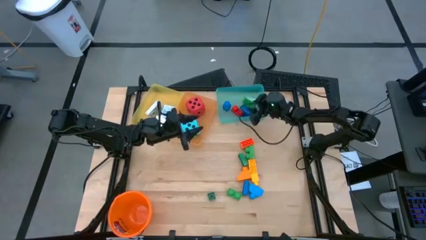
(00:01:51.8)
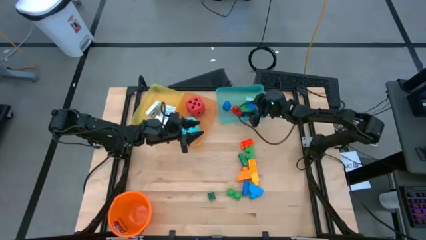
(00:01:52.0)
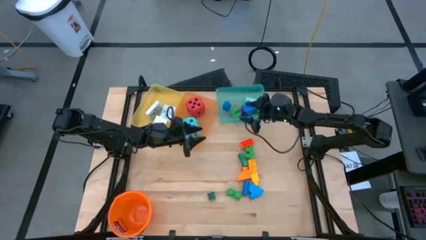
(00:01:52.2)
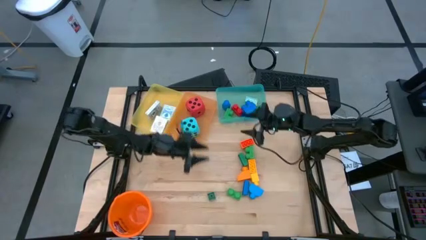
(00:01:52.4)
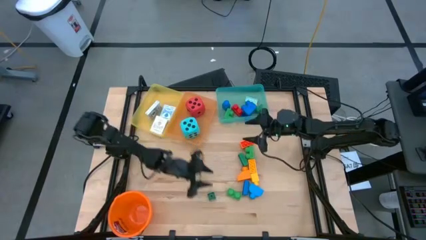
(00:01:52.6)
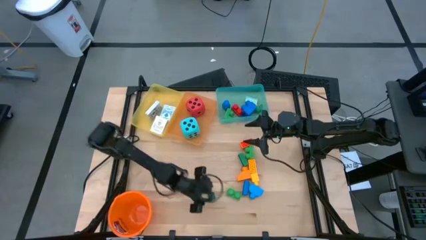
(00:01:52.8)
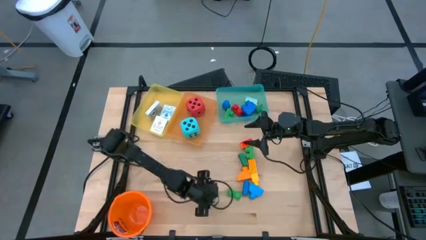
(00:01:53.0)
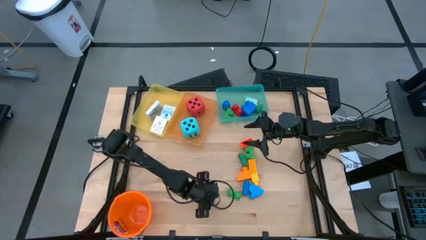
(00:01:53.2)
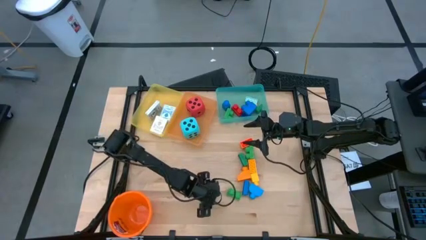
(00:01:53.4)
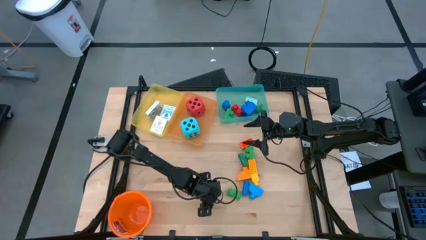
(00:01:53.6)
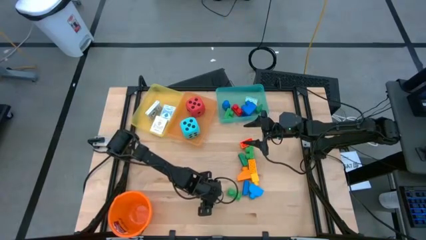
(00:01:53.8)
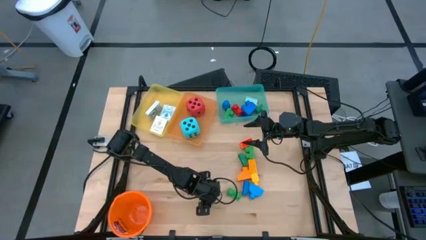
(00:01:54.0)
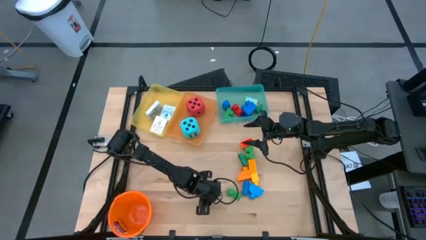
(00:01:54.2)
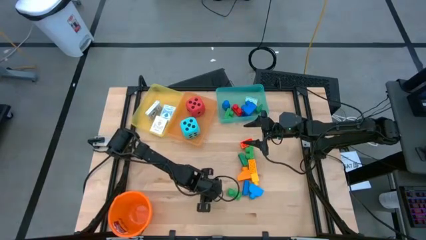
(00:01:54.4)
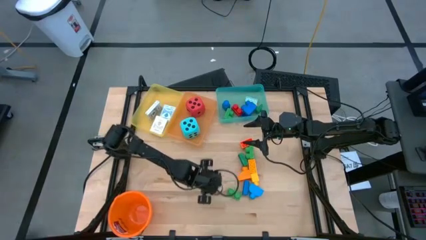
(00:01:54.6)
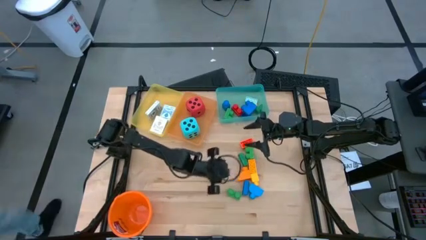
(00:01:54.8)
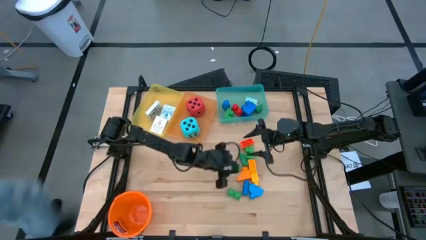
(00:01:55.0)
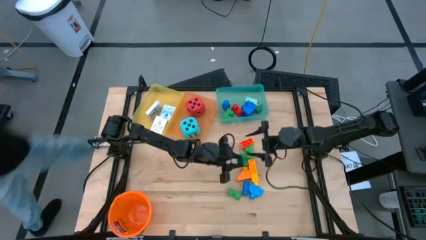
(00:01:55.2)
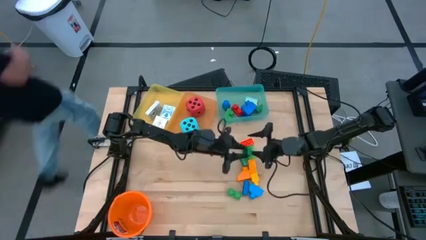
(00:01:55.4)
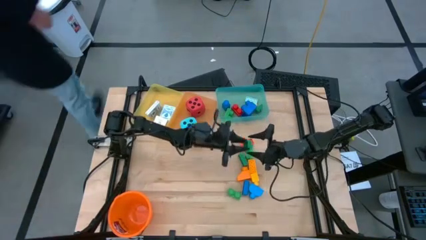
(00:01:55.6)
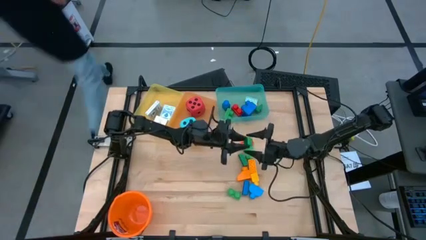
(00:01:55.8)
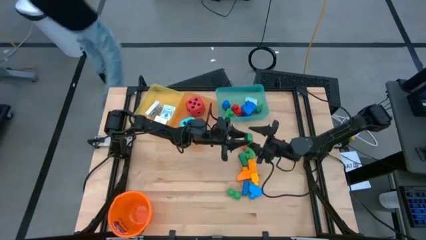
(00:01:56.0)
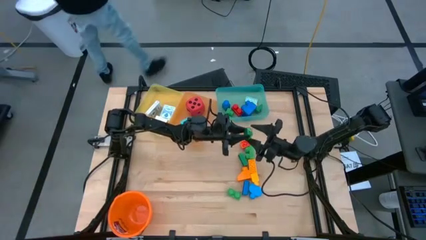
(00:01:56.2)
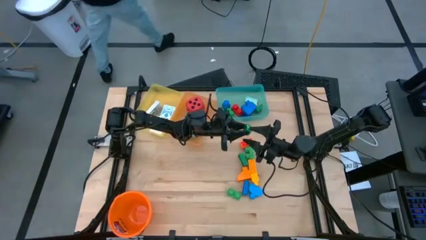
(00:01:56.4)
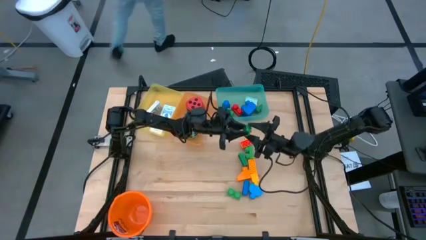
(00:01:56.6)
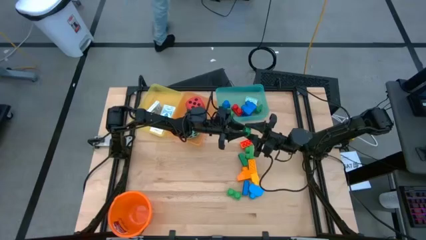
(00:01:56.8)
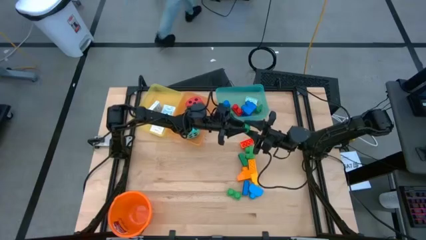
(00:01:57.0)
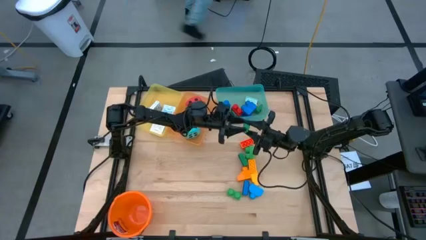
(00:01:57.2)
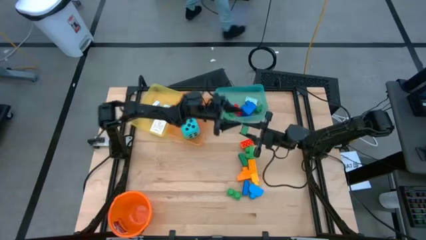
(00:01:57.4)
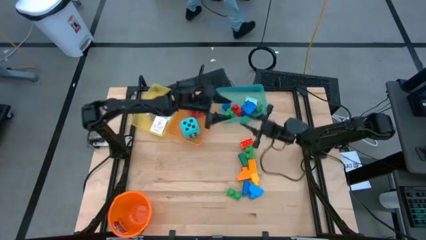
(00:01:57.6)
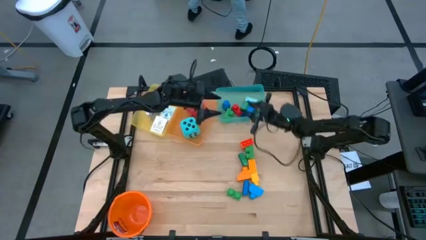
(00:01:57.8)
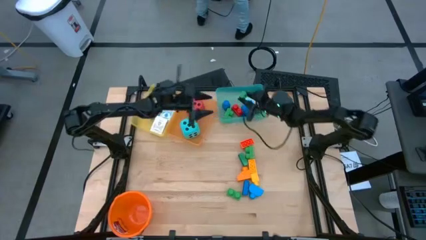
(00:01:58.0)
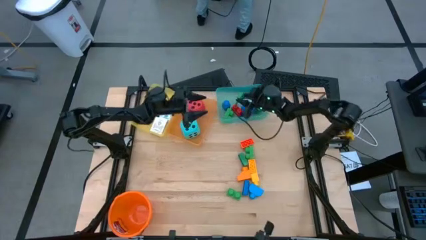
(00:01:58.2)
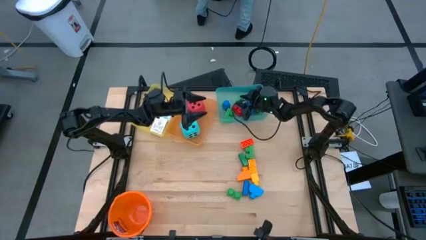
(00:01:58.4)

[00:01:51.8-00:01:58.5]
Task: Pick & Place Toys
Put the green game piece into the blue bin

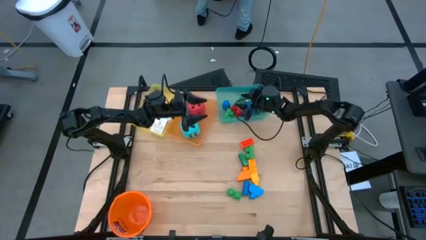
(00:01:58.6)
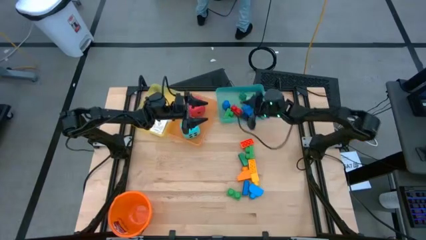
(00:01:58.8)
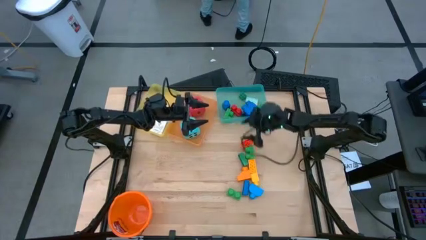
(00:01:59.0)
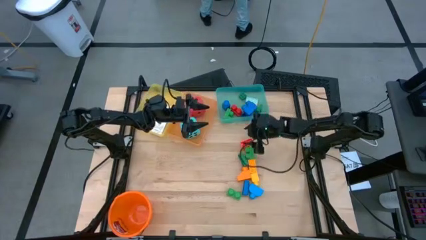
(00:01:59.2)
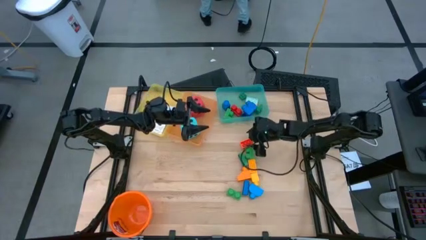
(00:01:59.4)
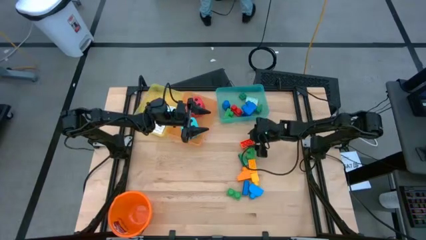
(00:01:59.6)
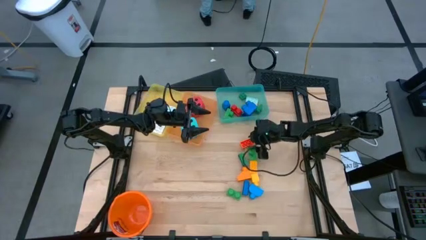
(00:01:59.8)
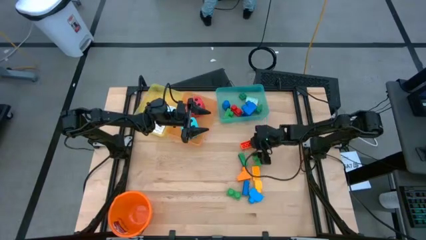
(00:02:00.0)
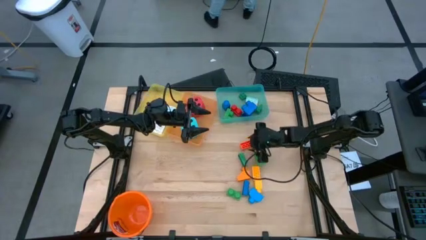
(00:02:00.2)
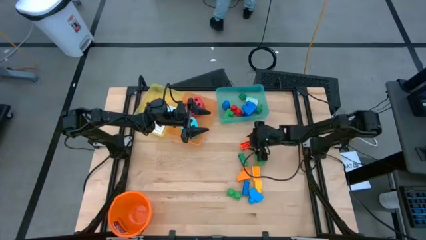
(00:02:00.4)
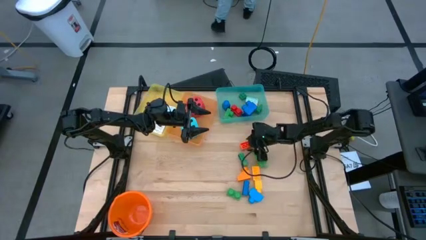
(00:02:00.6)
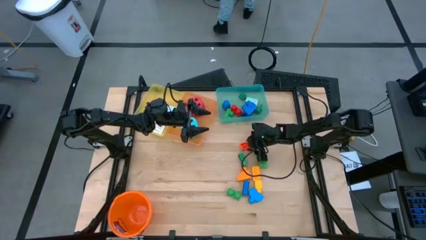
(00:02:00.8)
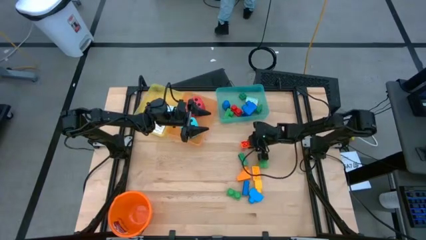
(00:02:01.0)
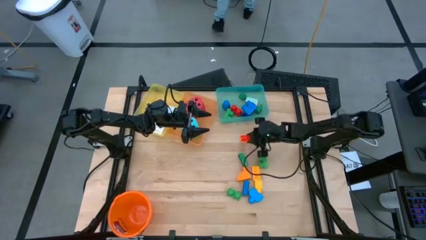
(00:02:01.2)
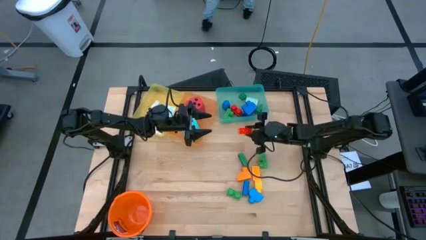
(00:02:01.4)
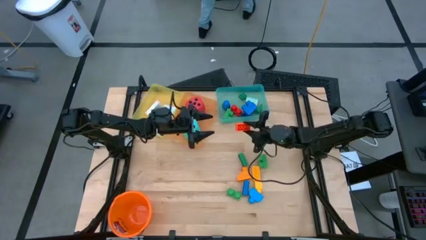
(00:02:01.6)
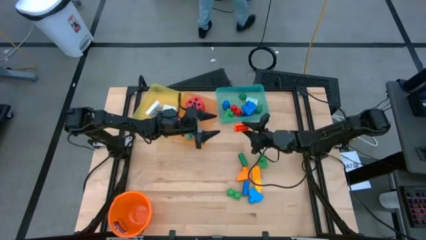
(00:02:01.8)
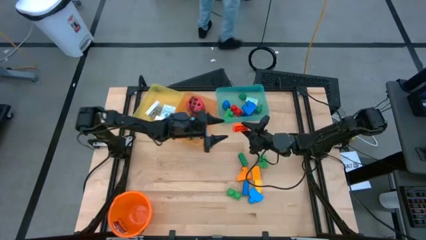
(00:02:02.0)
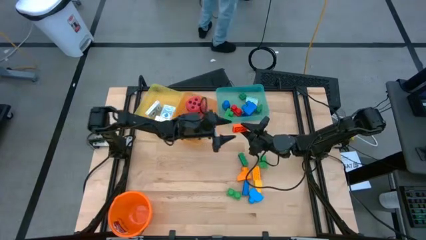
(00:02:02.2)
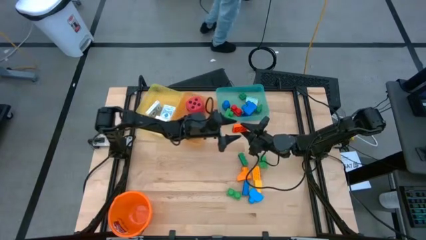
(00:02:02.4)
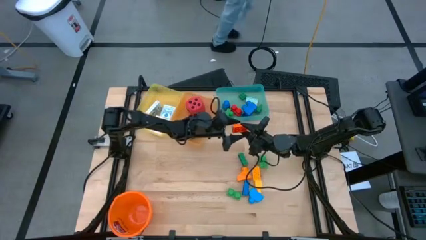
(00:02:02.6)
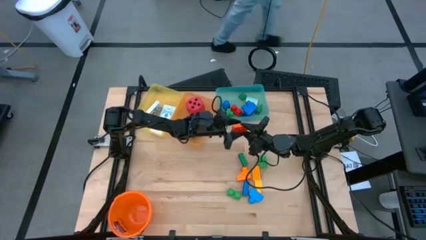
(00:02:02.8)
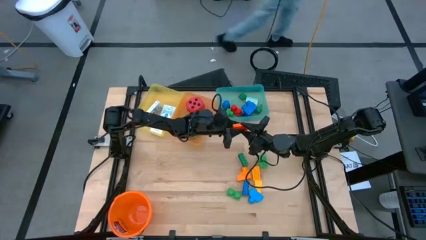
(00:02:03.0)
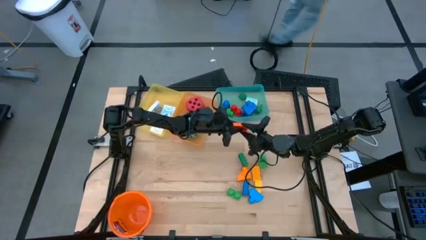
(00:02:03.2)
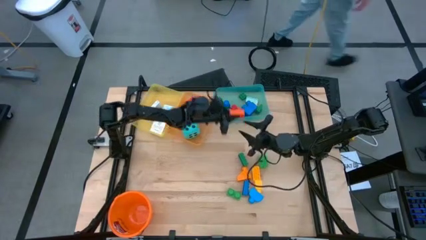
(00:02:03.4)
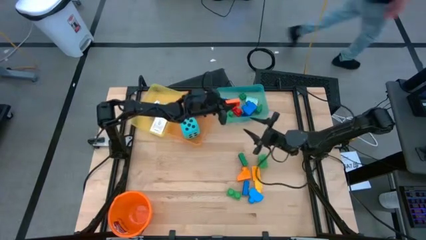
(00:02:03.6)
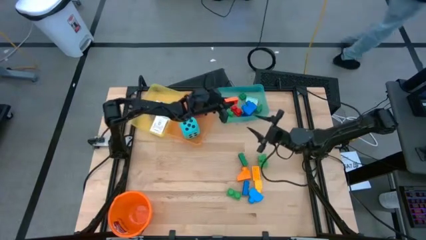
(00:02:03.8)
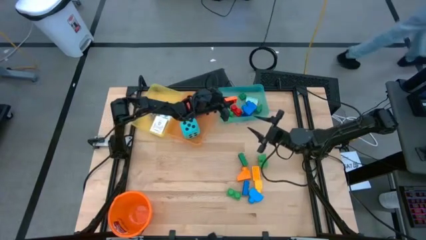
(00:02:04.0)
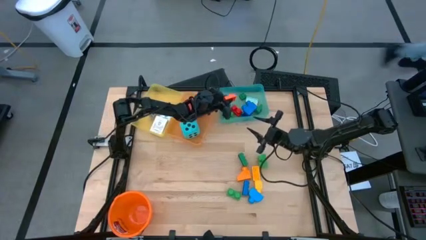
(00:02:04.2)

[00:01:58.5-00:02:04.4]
Put the orange game piece into the blue bin

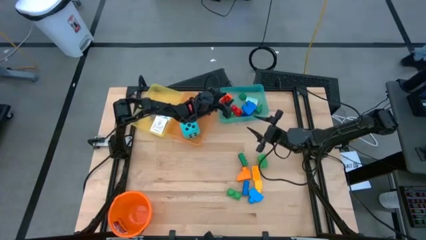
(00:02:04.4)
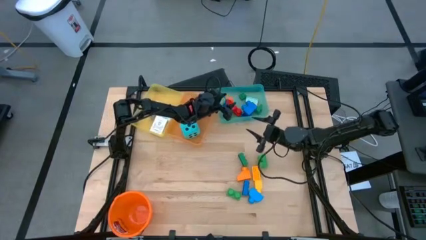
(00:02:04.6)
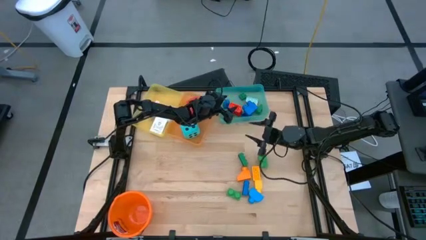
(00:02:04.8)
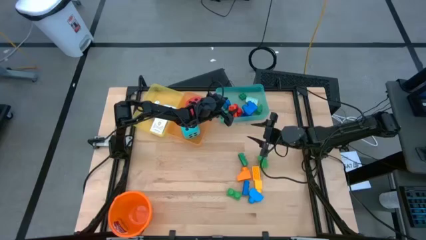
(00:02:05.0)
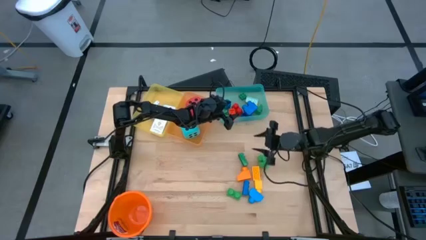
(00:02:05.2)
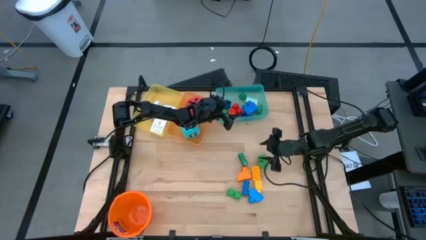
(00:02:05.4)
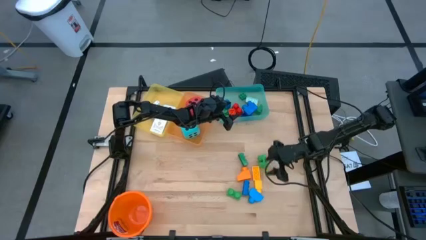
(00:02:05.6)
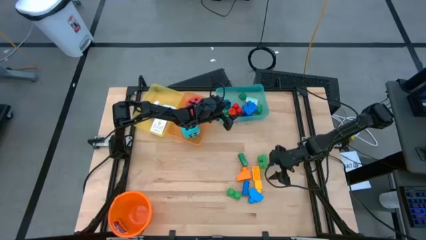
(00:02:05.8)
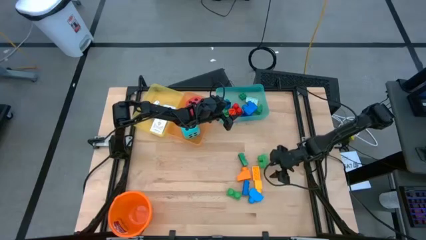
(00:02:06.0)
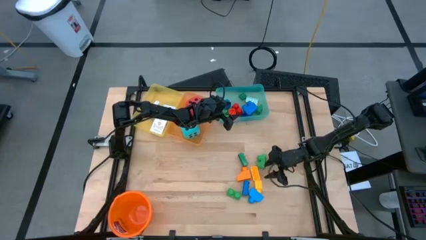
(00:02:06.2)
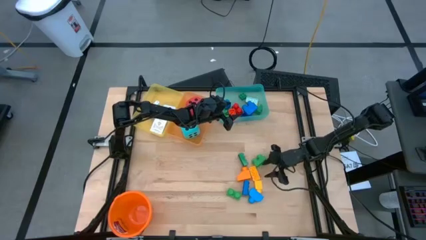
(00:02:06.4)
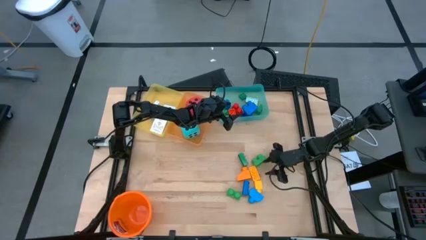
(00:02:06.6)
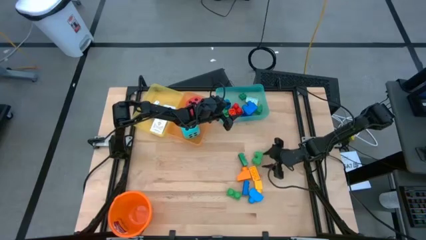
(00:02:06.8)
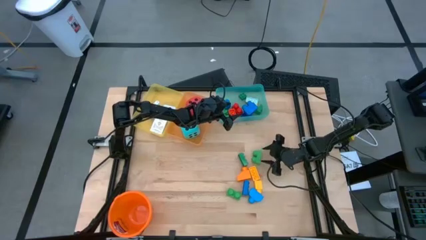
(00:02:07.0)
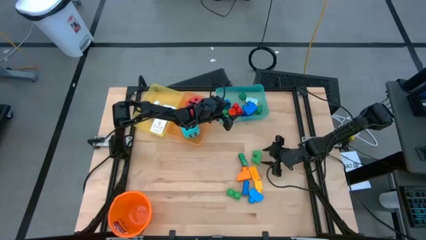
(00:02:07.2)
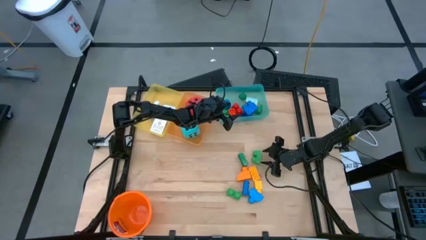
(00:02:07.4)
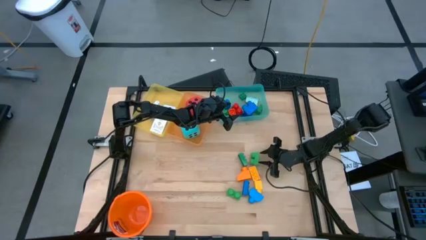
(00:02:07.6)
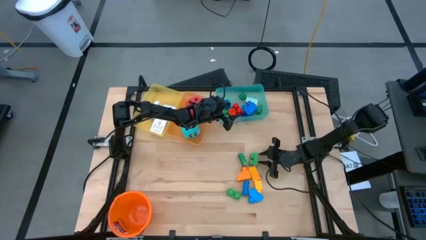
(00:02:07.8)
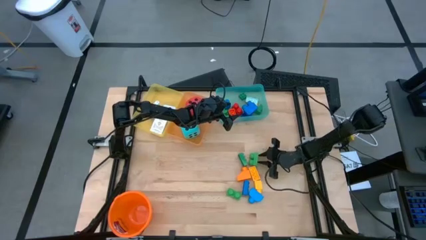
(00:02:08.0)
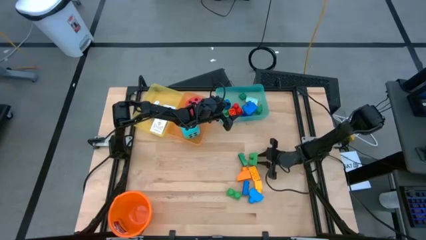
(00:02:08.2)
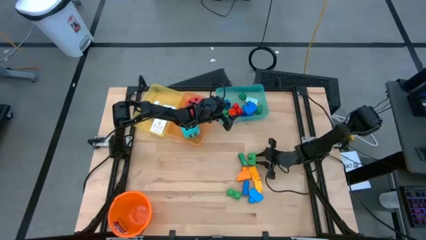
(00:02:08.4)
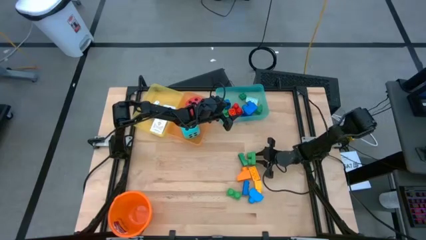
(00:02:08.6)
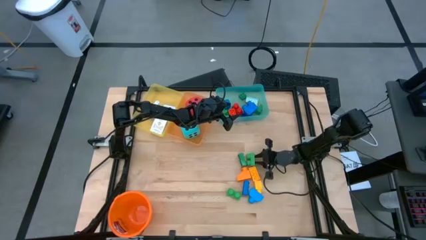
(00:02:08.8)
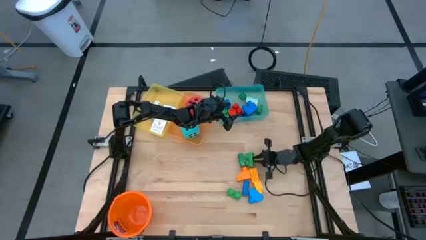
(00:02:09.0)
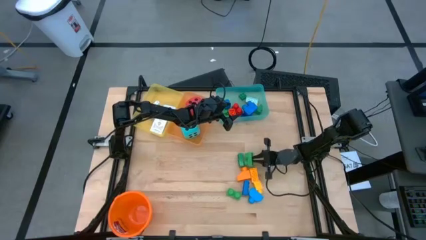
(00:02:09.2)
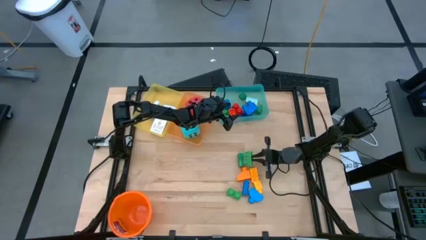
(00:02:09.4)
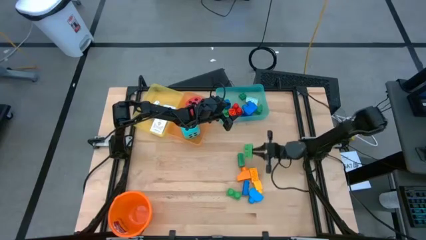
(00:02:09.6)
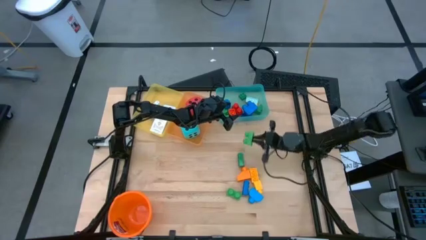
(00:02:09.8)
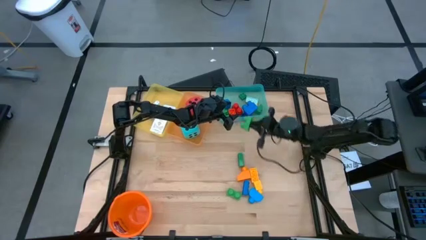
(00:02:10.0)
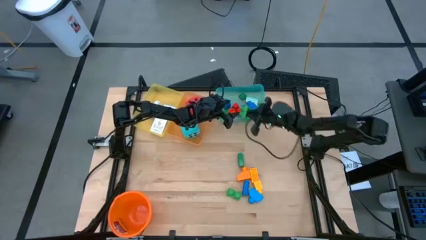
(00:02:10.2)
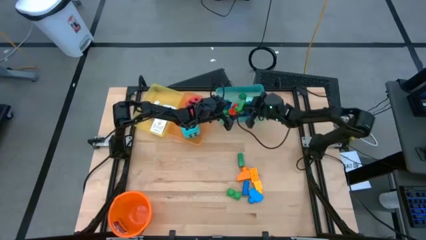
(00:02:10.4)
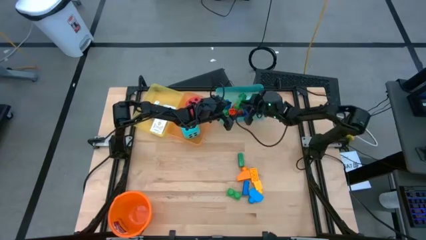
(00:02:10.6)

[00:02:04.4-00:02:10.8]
Put the top green game piece into the blue bin
